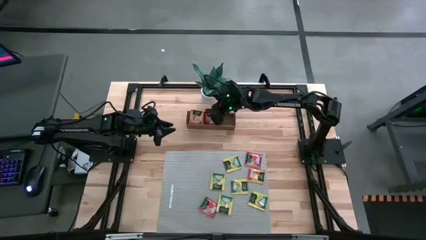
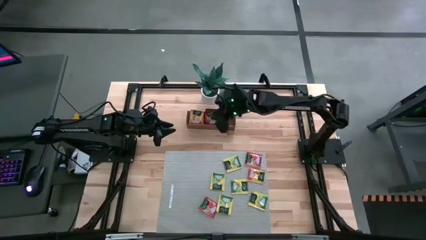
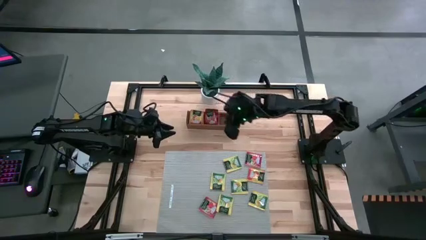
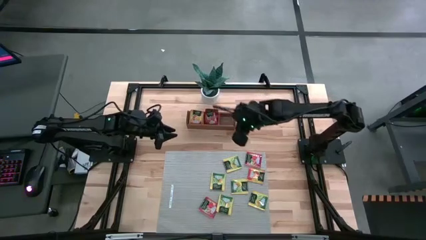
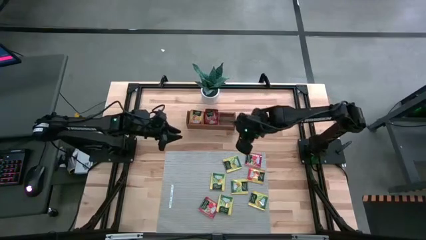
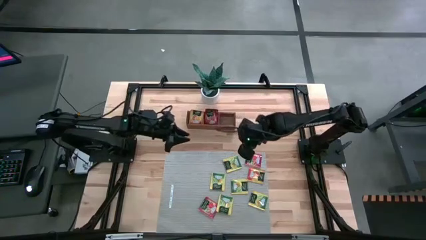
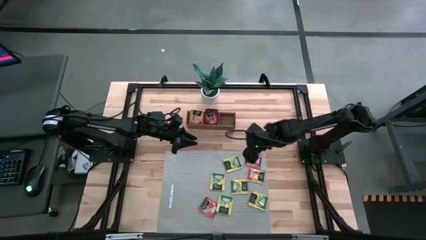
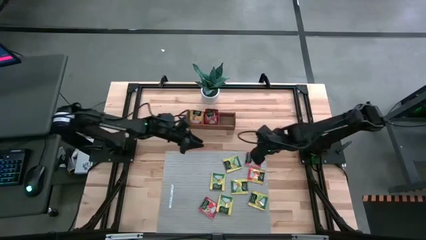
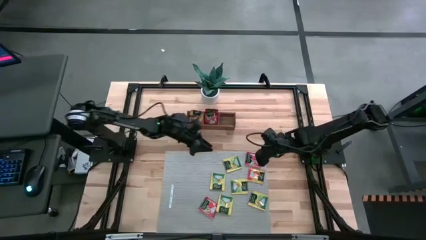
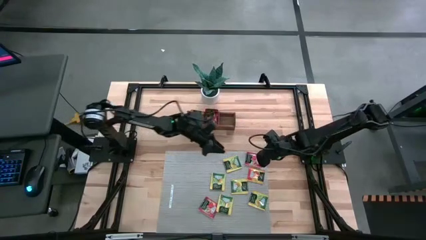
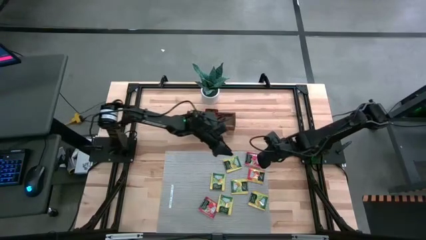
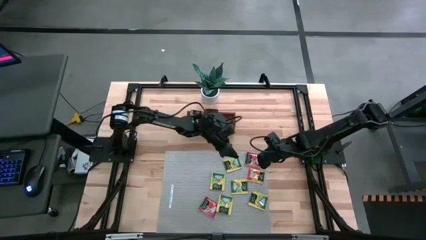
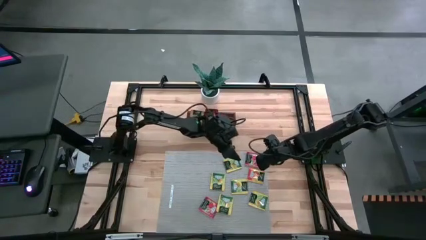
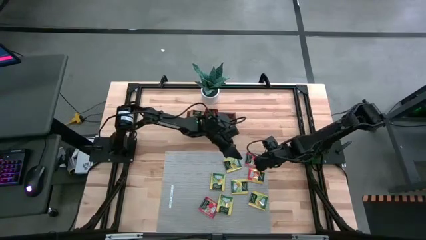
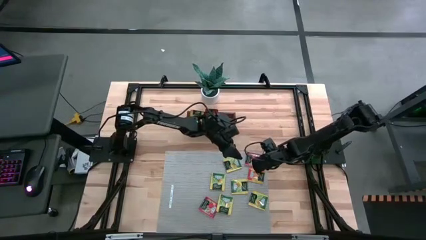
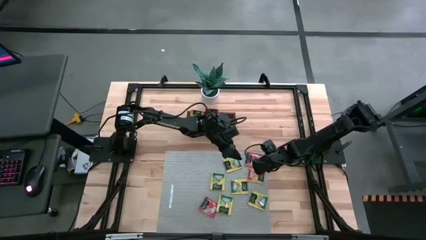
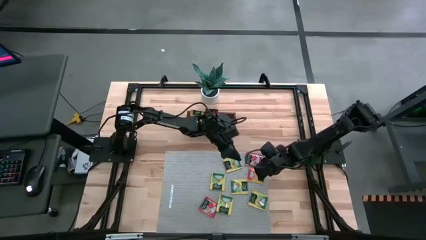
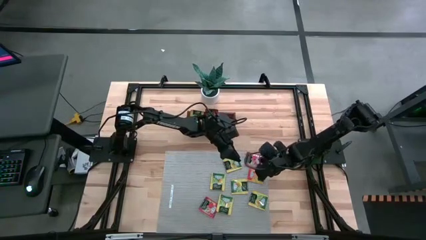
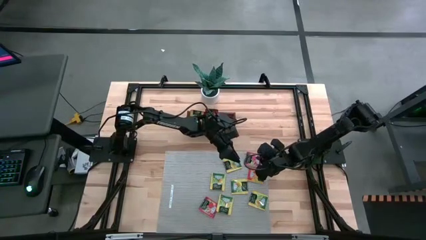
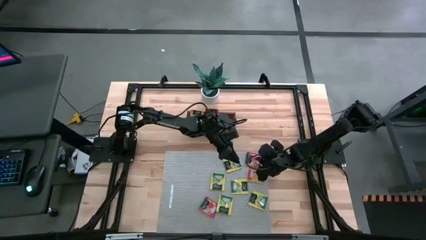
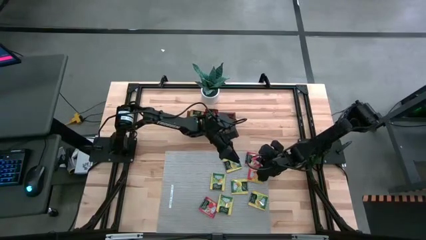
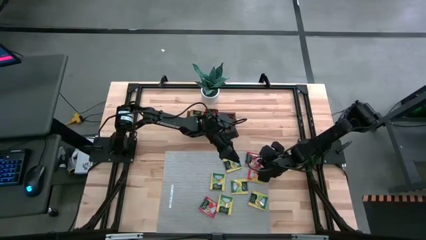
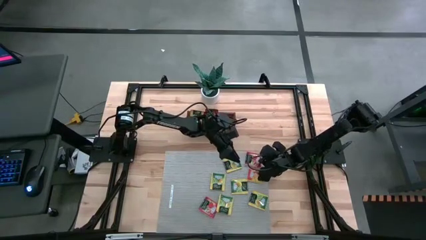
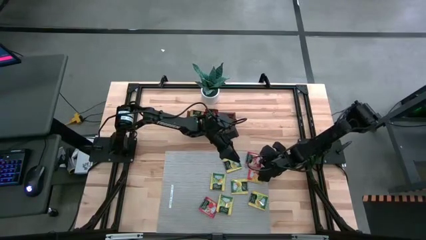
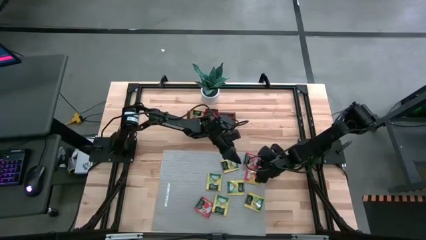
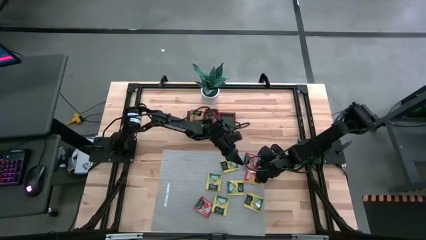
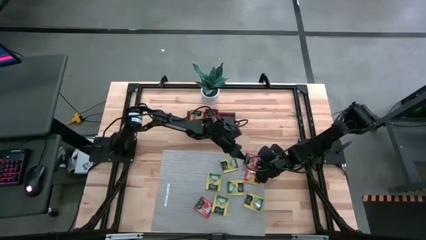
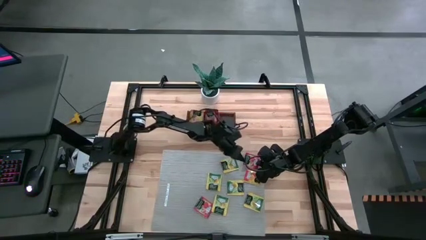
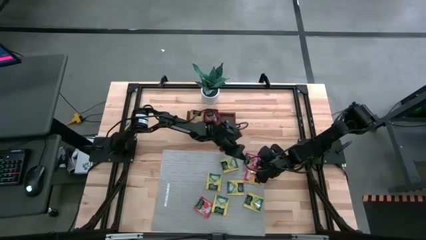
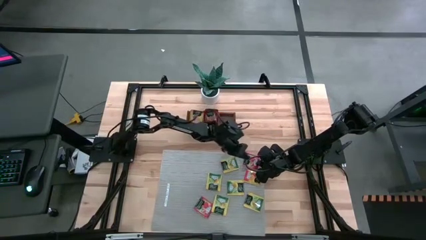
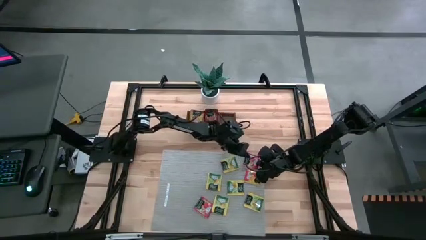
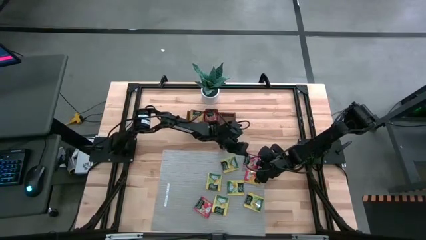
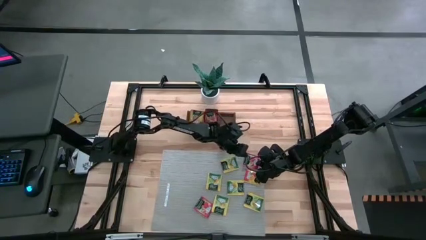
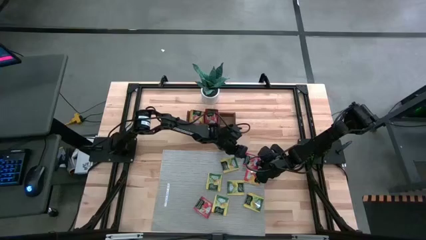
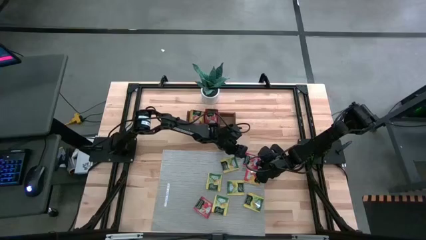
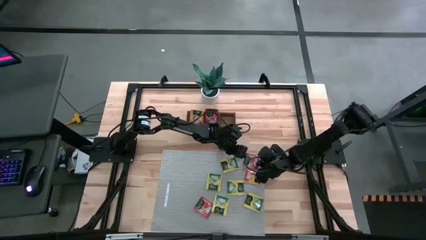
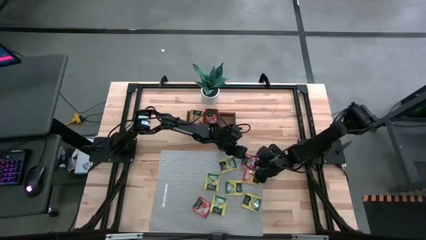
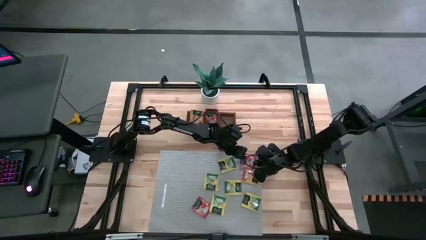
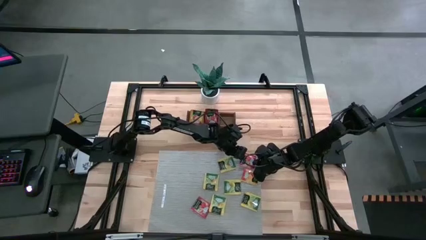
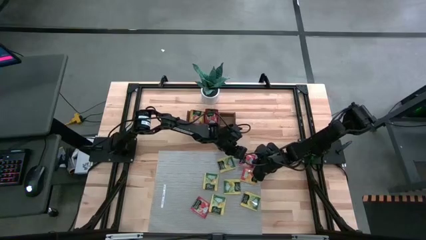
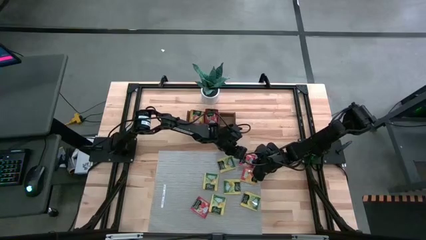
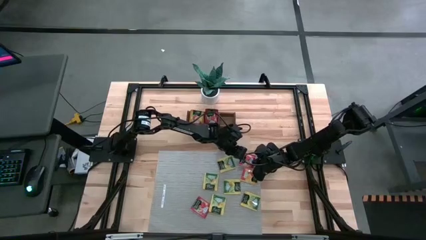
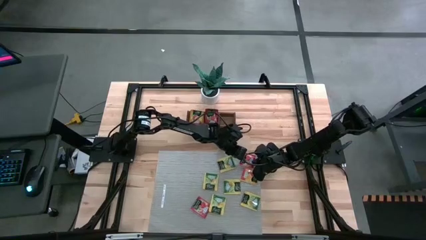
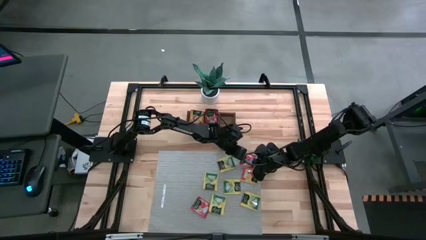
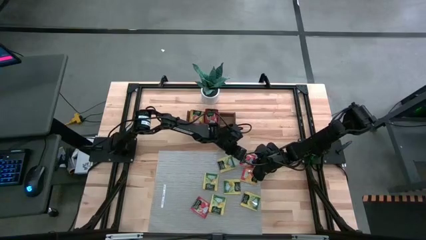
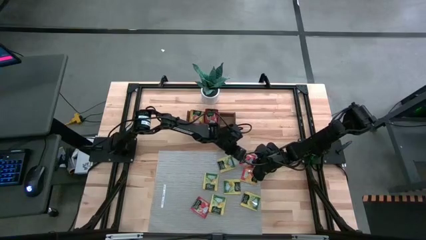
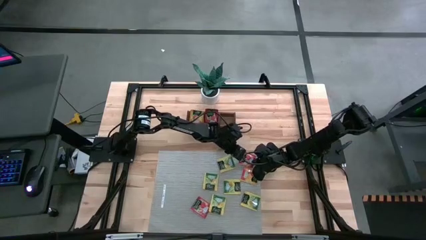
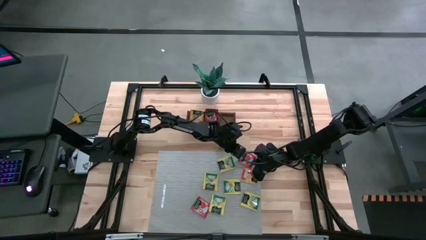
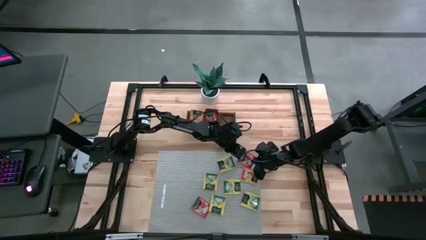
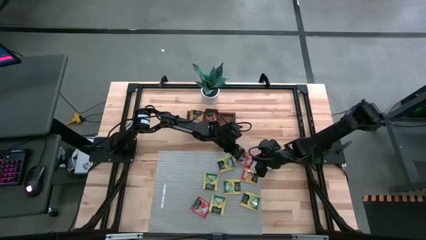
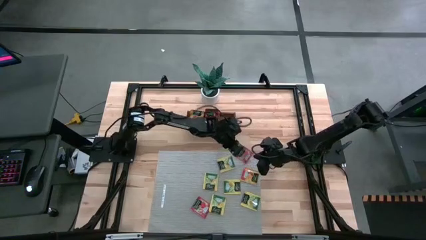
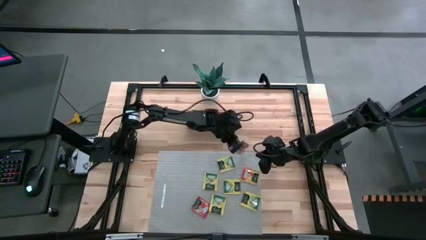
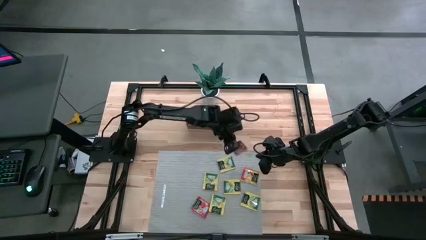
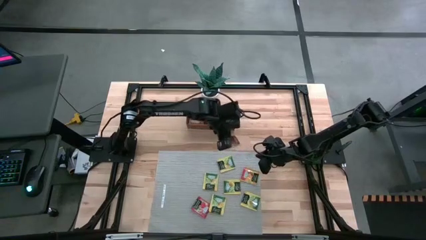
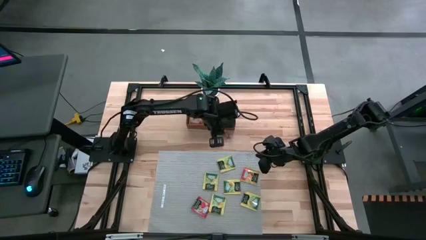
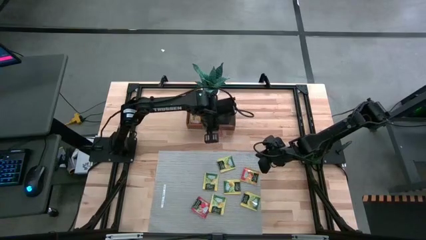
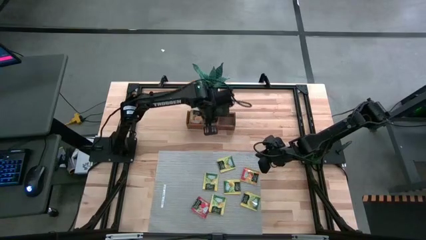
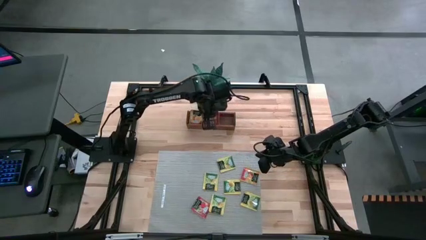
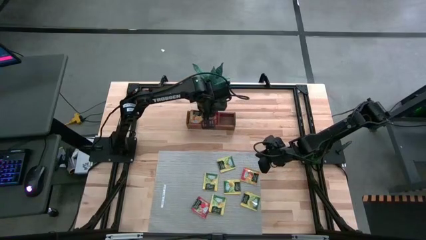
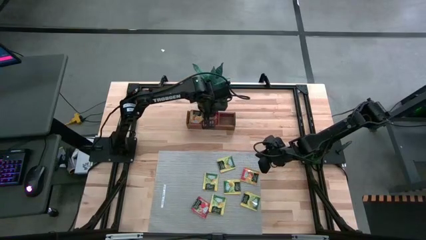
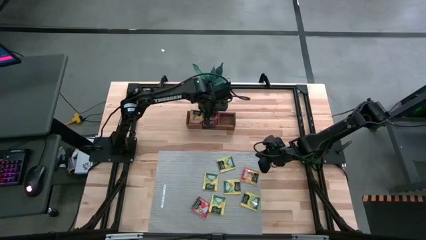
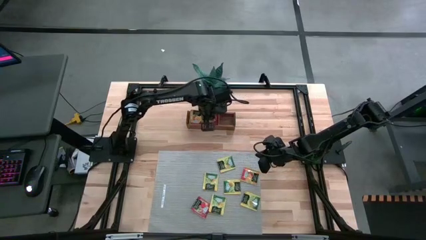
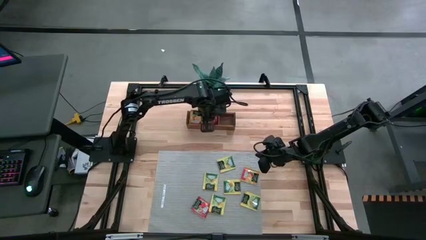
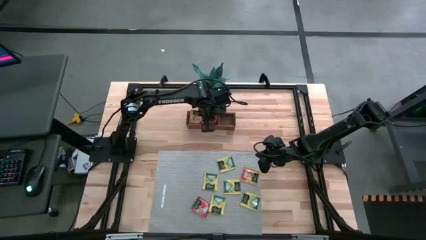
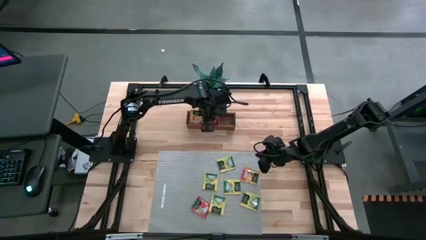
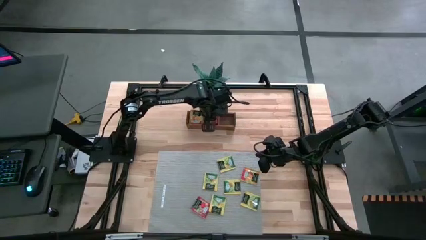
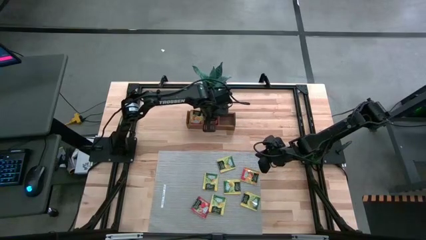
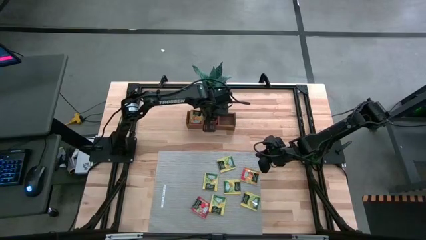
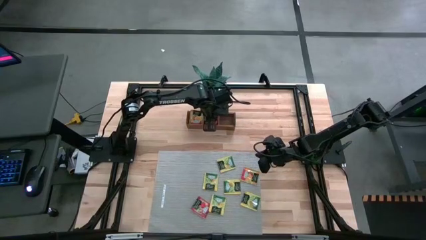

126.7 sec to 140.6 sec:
Task: Pick & Place Tea
Put the red tea bag into the middle section of the wooden organizer
